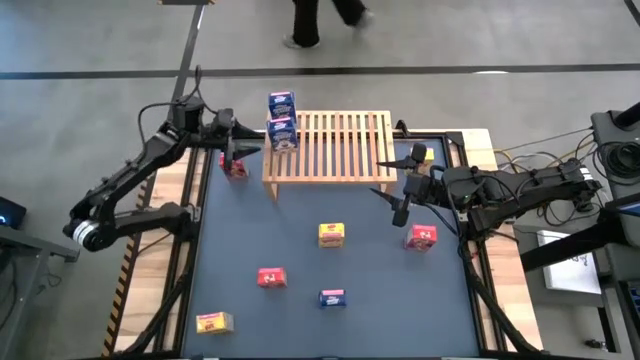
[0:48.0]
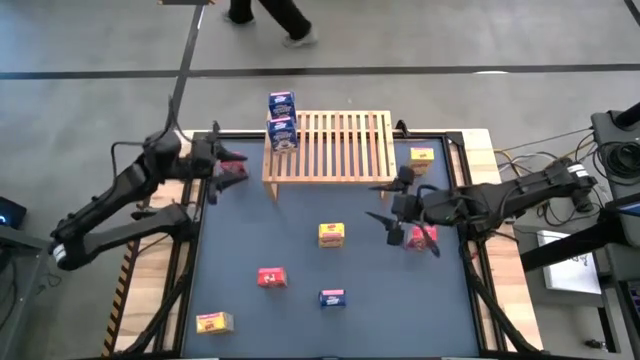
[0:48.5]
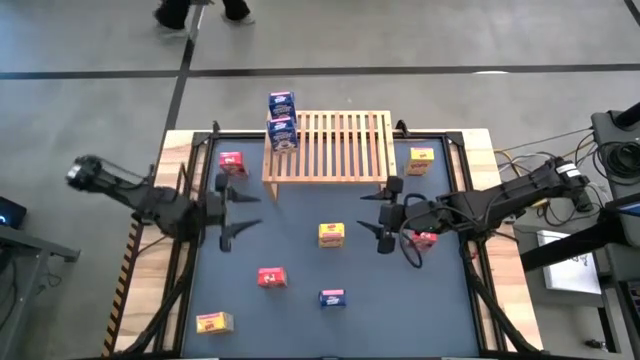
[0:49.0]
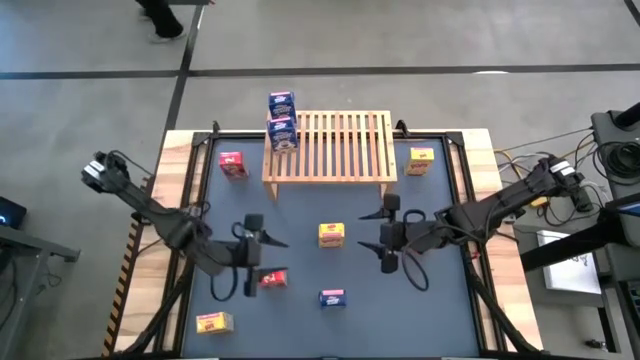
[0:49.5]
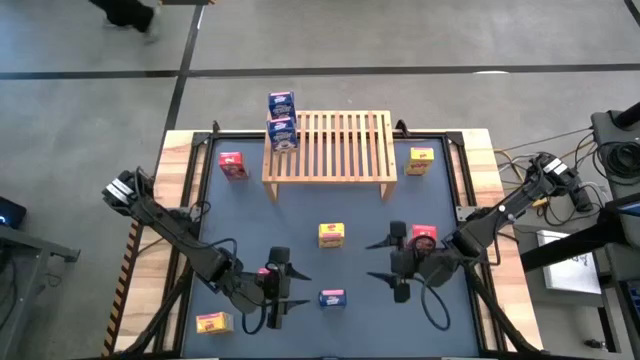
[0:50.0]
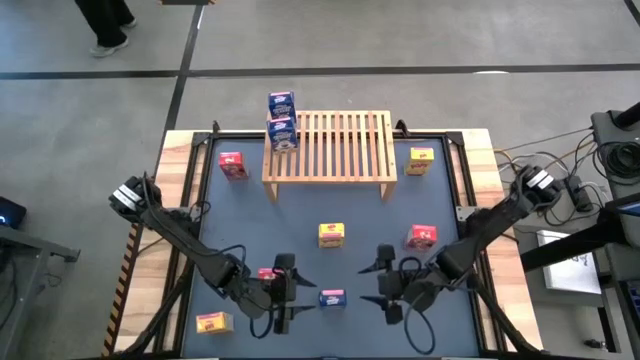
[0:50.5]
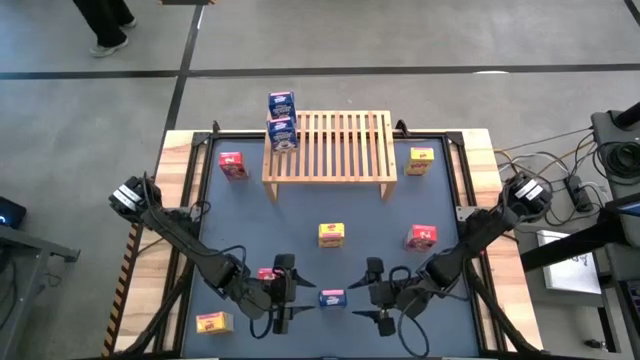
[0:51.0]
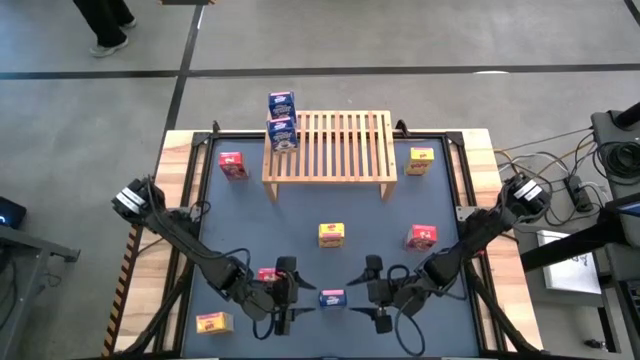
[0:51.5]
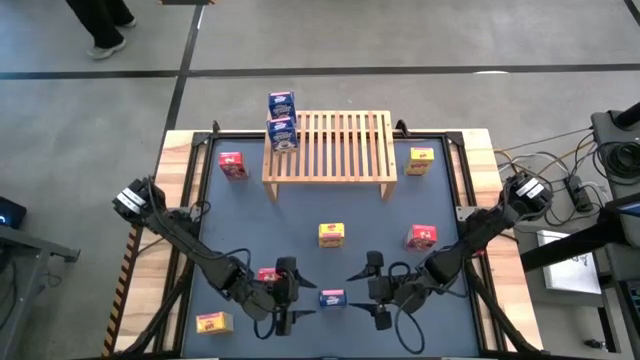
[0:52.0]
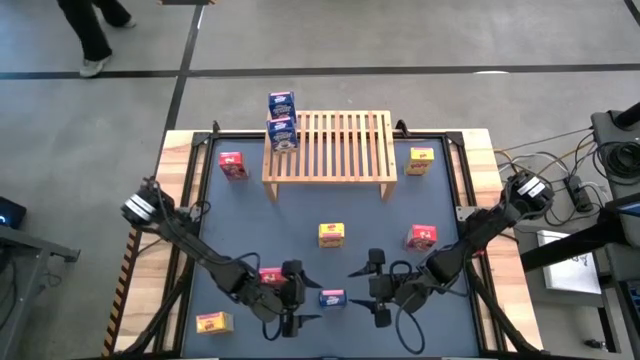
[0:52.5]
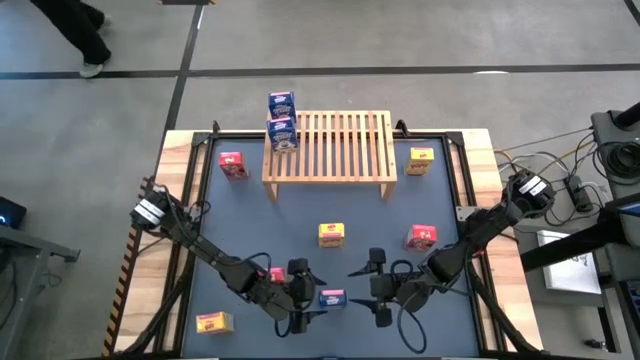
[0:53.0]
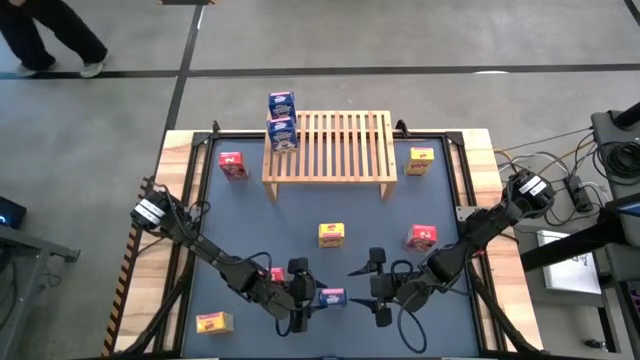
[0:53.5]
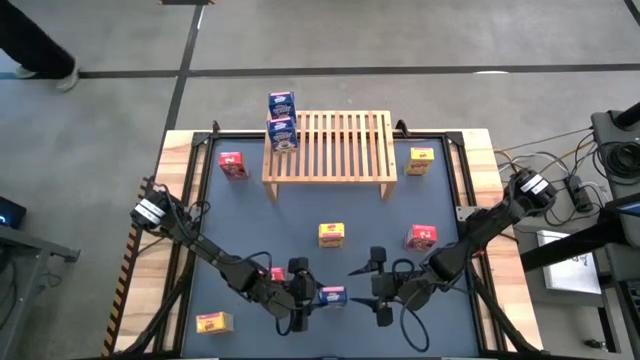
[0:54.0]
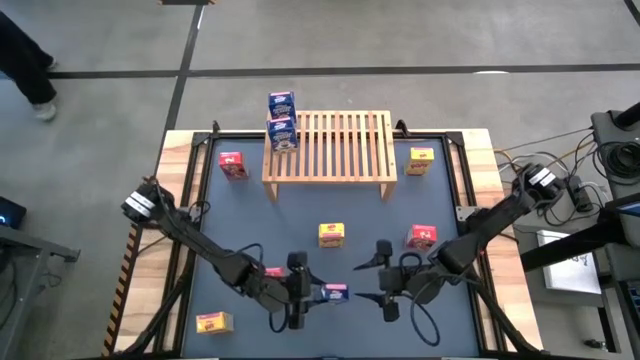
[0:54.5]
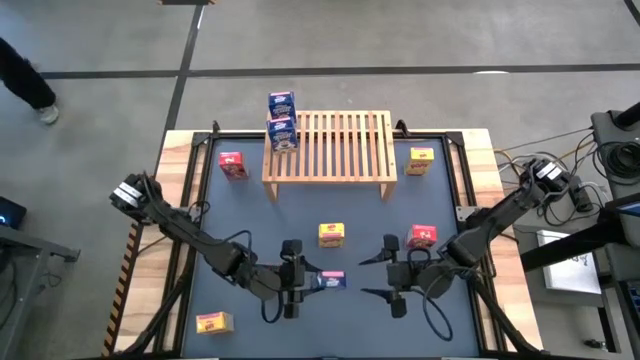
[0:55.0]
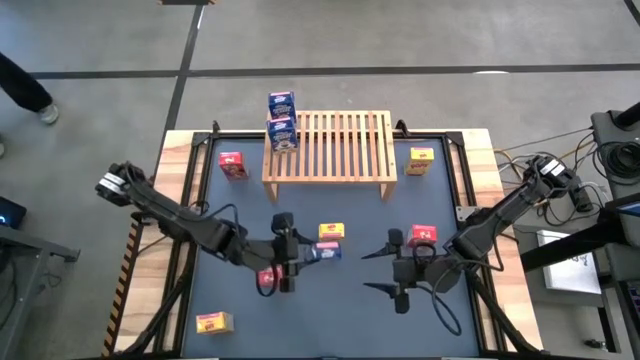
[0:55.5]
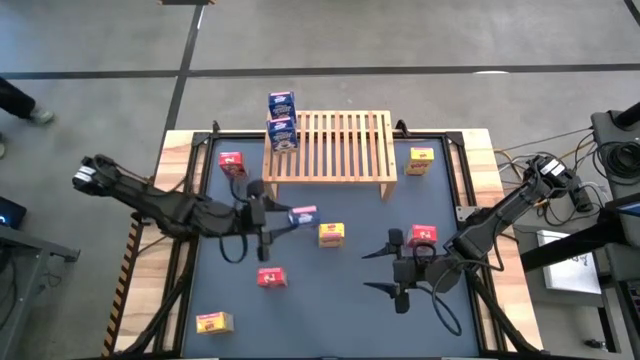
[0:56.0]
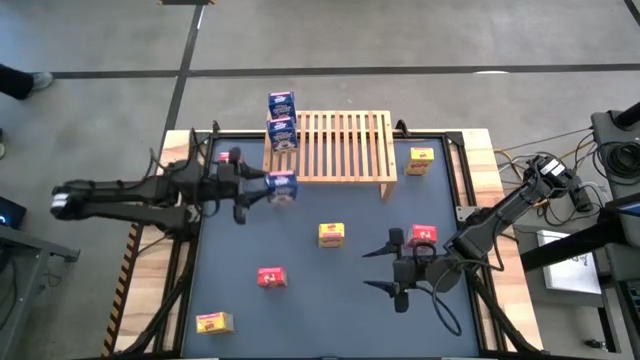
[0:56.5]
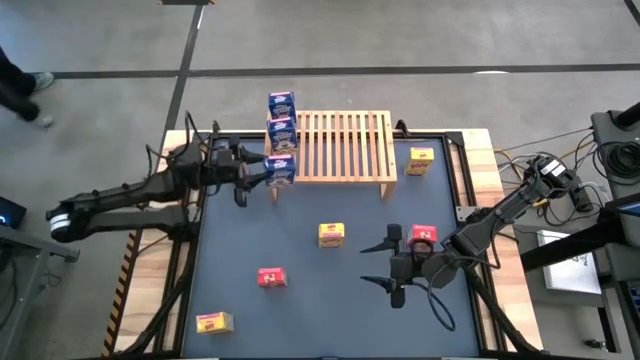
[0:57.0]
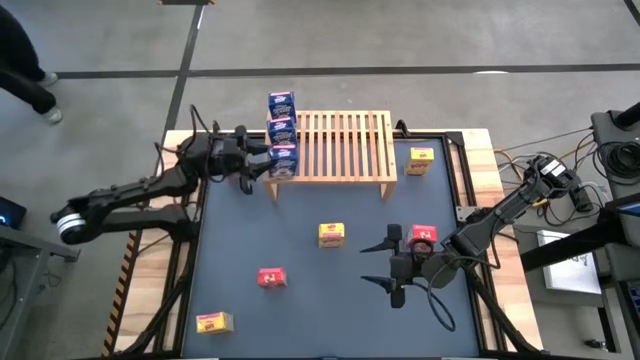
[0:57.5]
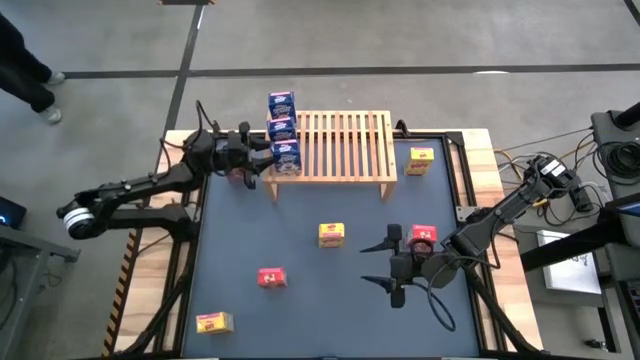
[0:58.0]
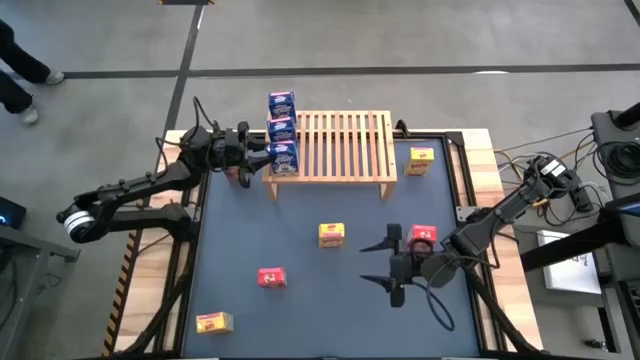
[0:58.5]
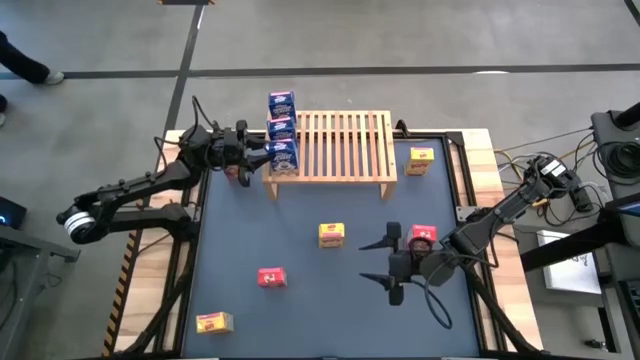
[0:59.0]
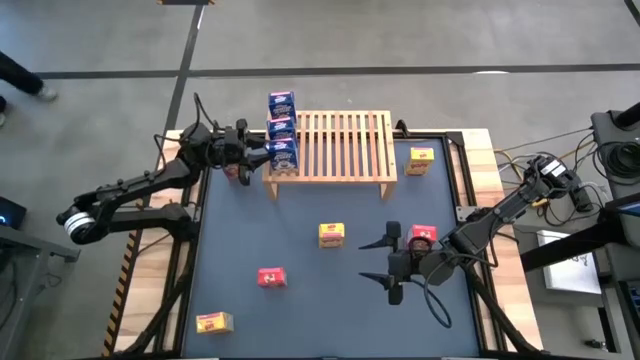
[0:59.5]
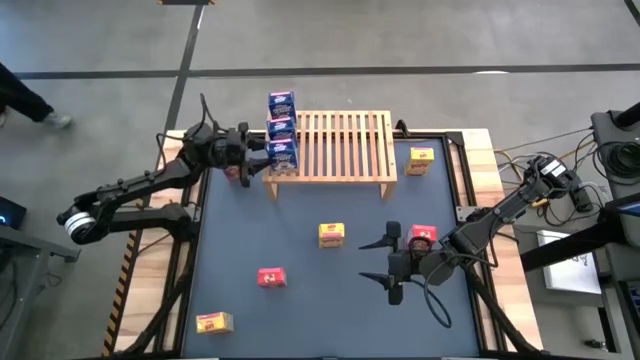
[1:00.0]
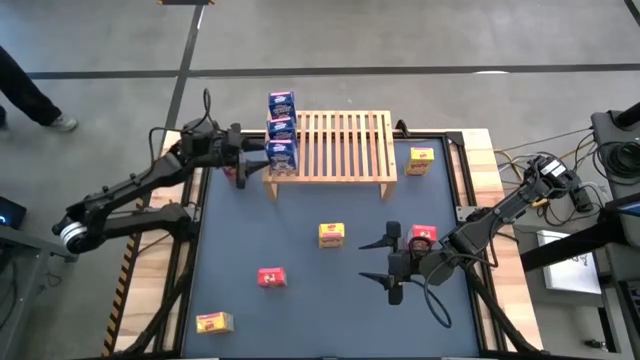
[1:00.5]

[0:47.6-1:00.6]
Task: Stack cereal on shelf
Put the blue cereal box on the shelf aligned with the other blue cereal boxes

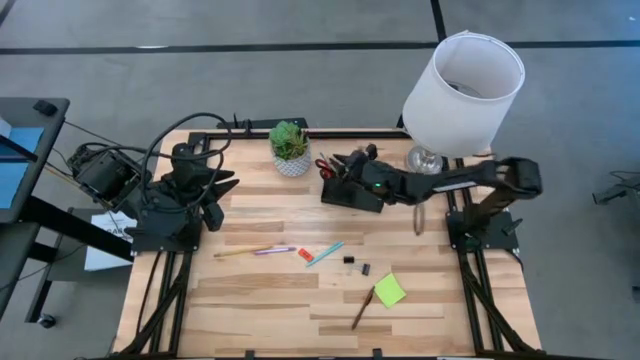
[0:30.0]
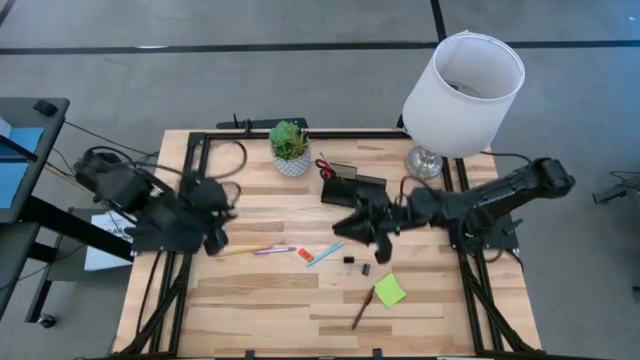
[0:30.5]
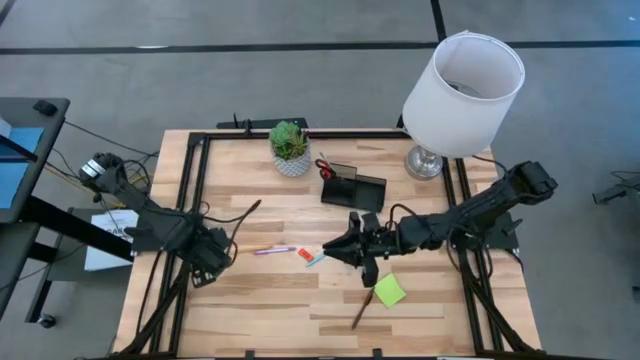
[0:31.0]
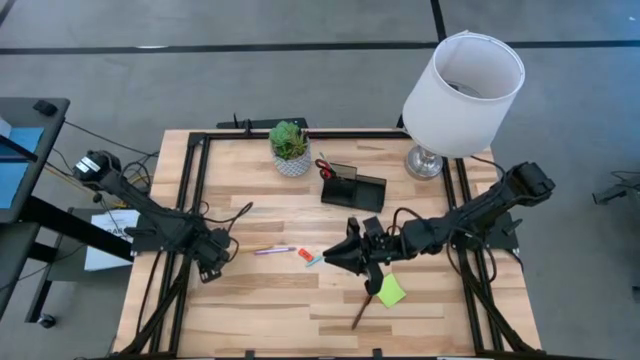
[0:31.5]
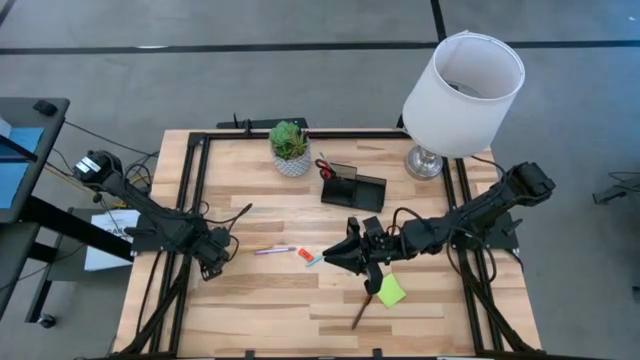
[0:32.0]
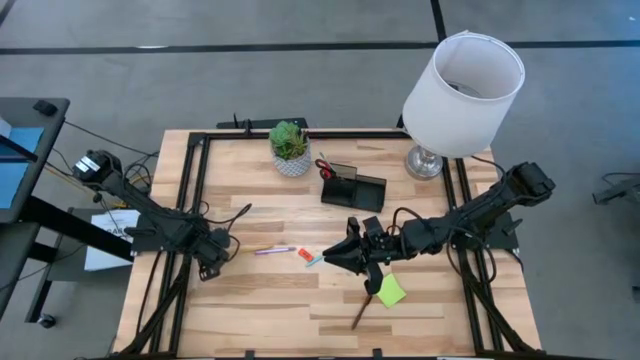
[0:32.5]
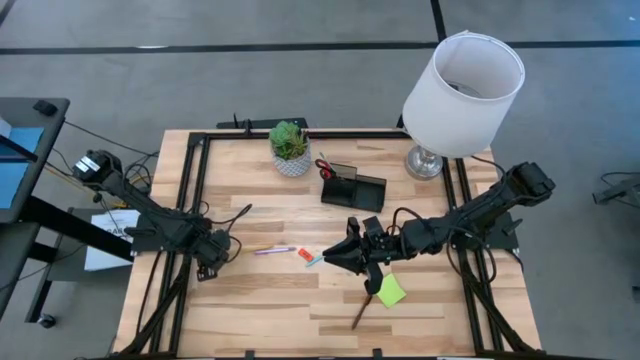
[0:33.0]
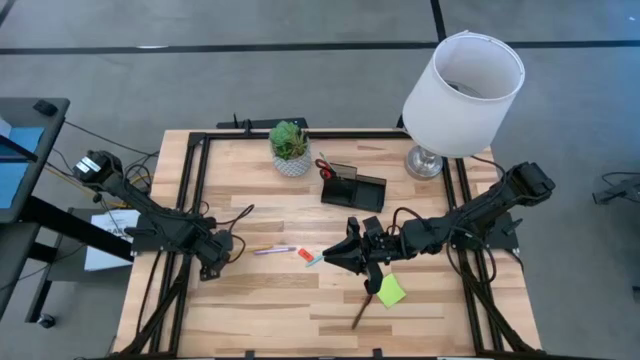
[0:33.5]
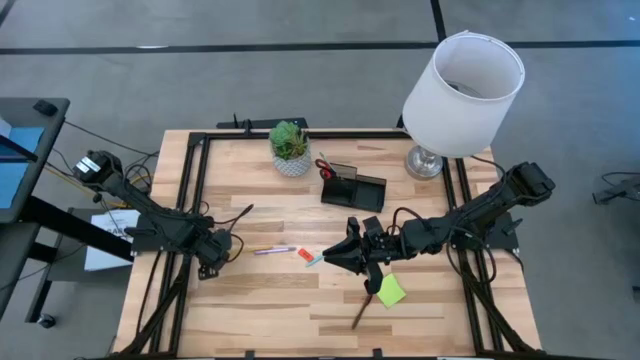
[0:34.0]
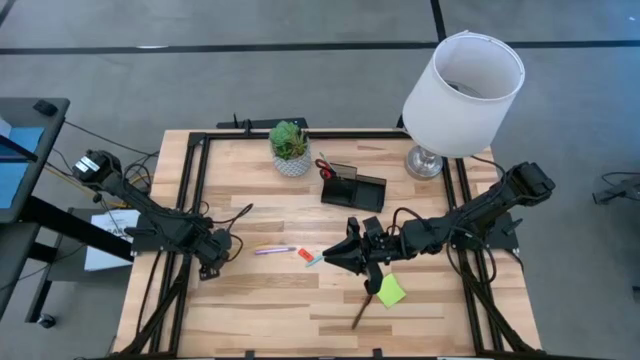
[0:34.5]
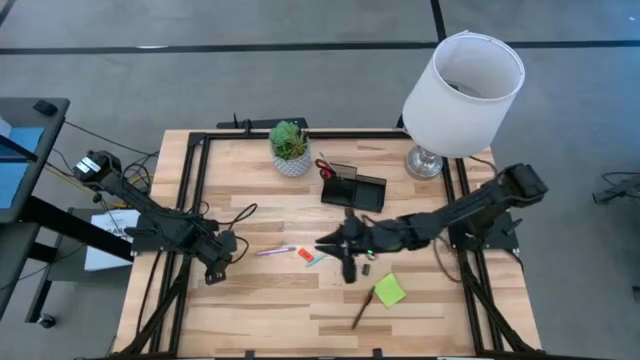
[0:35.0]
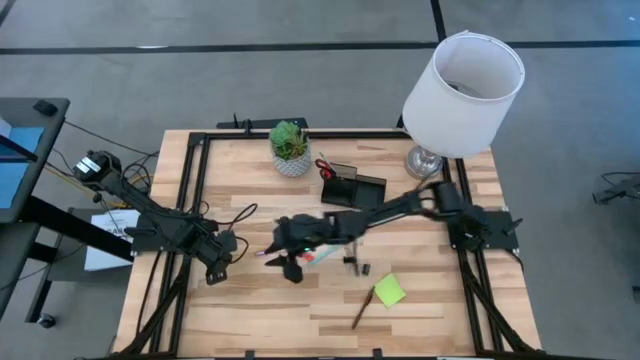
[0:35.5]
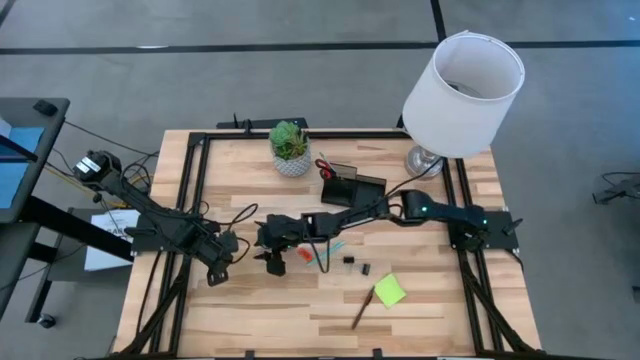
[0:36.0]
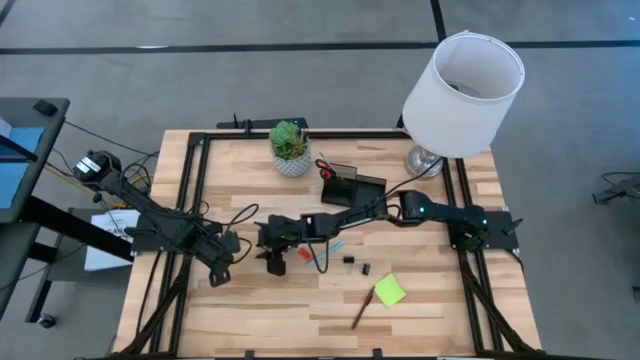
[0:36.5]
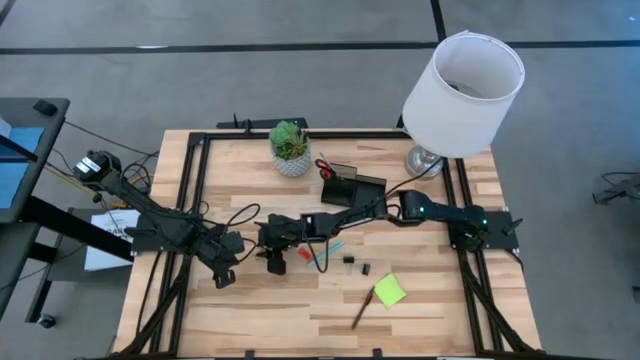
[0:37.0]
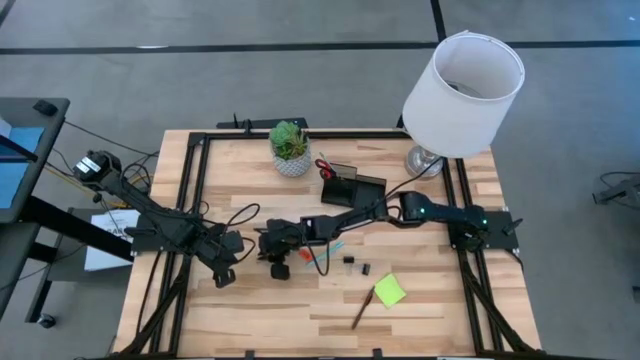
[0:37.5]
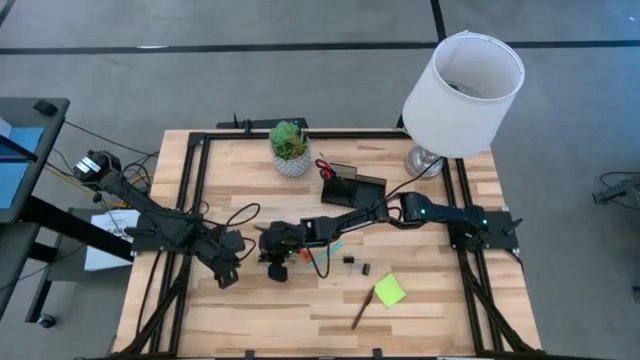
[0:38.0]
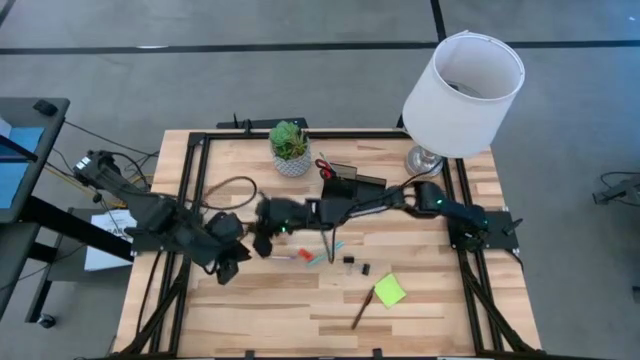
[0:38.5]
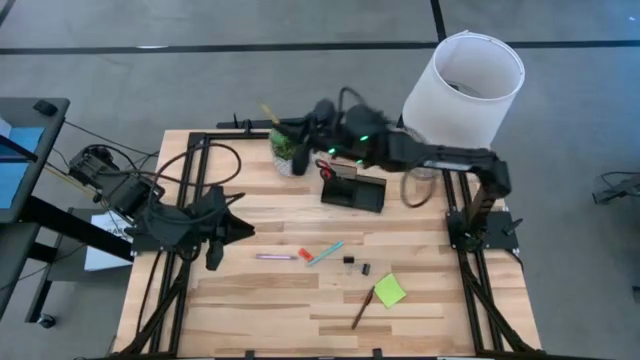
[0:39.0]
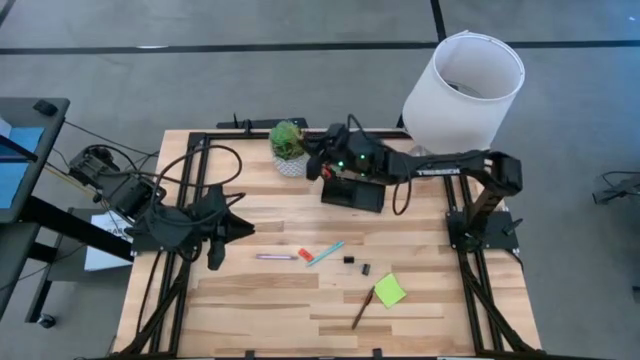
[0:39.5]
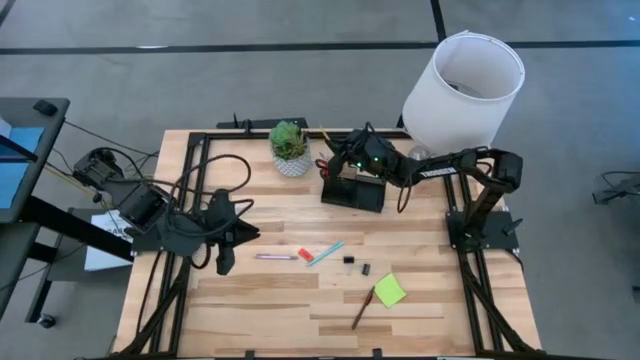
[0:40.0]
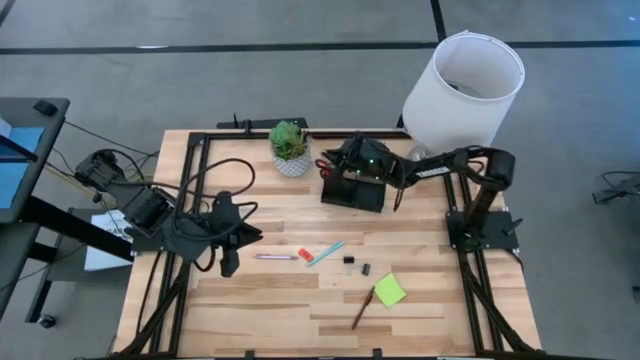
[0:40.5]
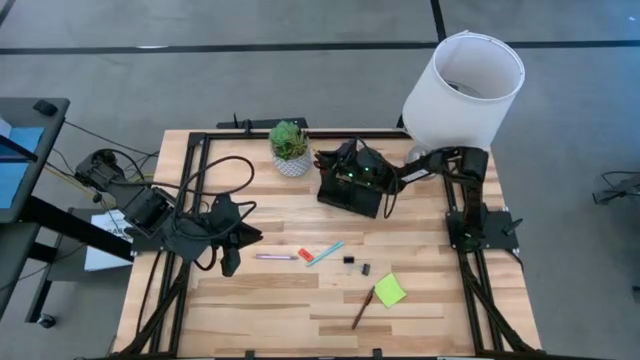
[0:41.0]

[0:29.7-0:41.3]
Task: Pick and place office supplies into organizer
Put the yellow pencil into the black desk organizer
